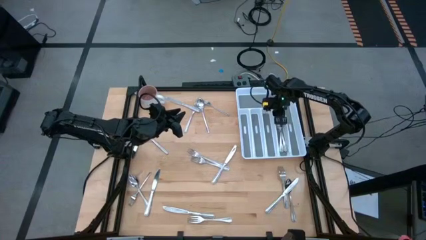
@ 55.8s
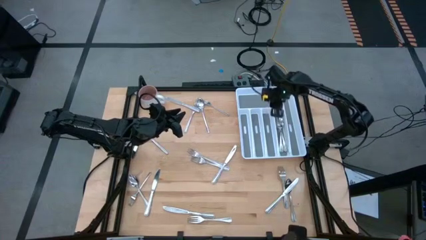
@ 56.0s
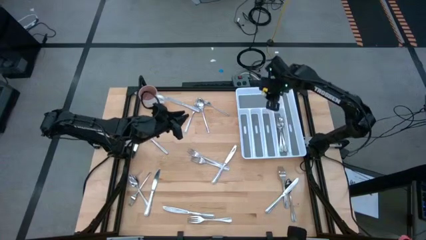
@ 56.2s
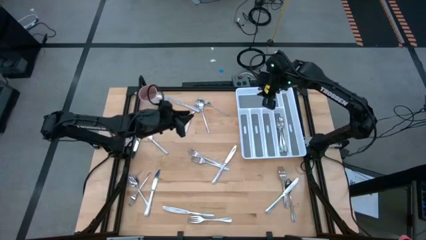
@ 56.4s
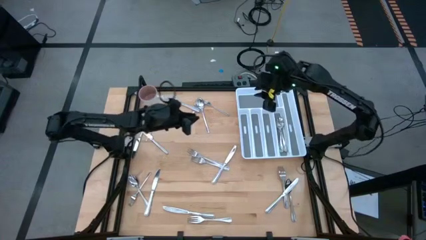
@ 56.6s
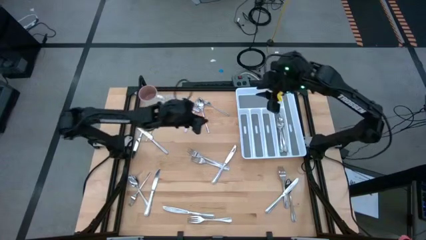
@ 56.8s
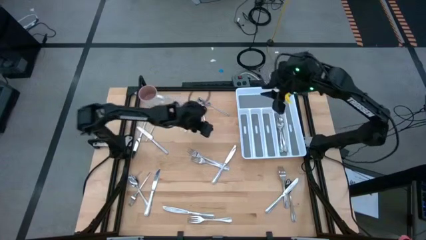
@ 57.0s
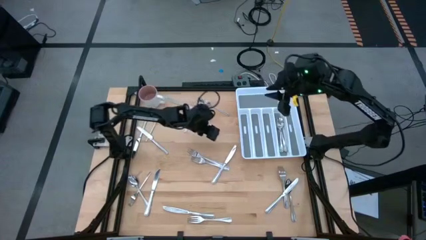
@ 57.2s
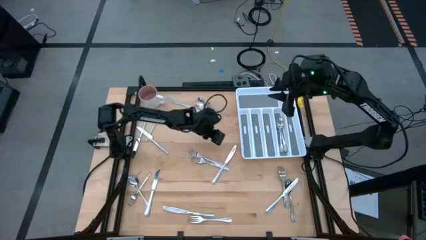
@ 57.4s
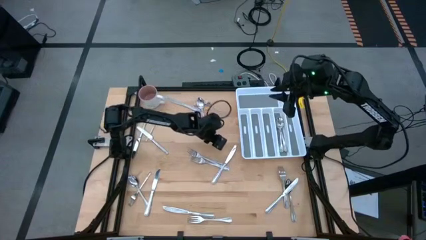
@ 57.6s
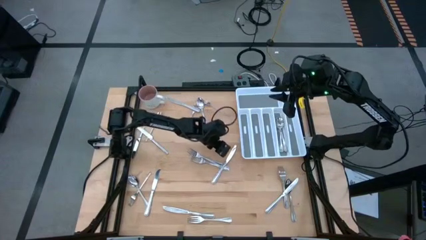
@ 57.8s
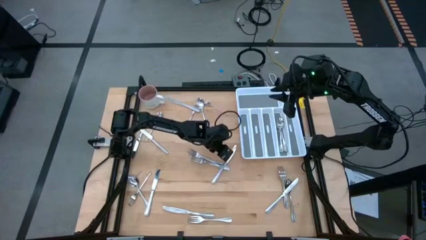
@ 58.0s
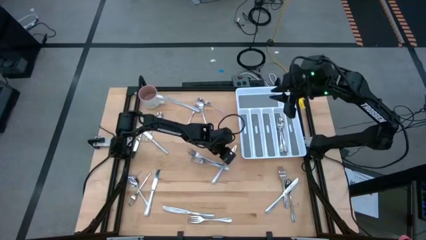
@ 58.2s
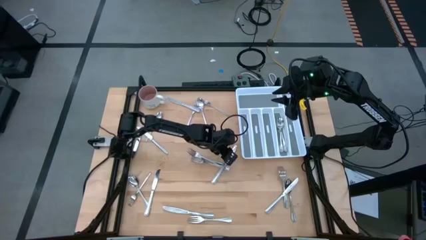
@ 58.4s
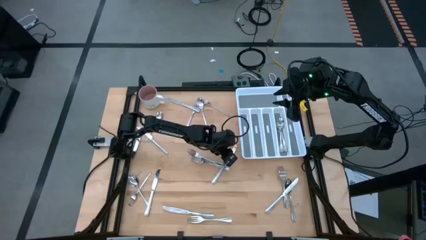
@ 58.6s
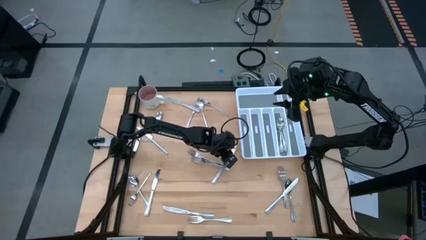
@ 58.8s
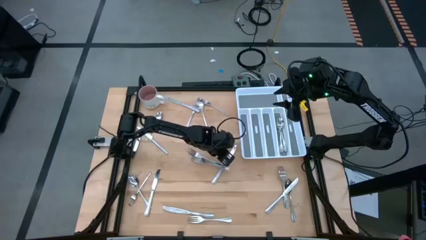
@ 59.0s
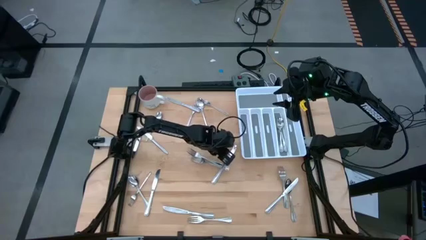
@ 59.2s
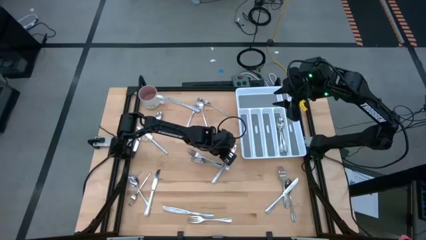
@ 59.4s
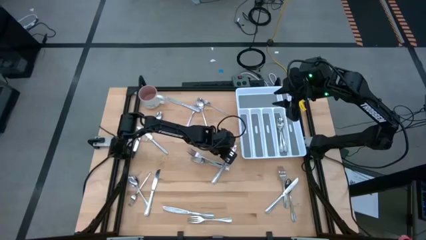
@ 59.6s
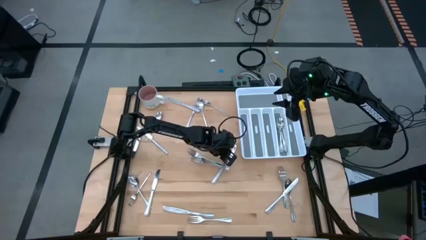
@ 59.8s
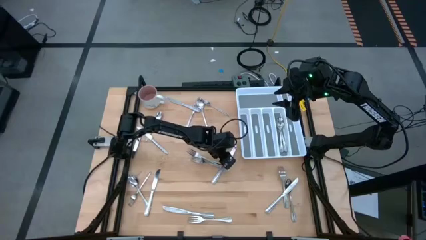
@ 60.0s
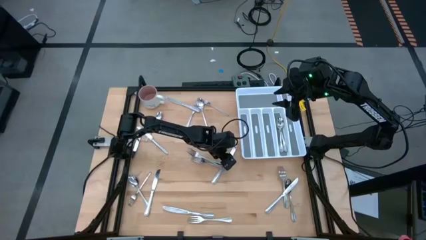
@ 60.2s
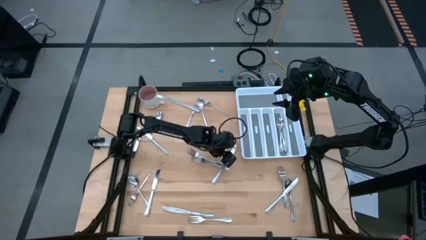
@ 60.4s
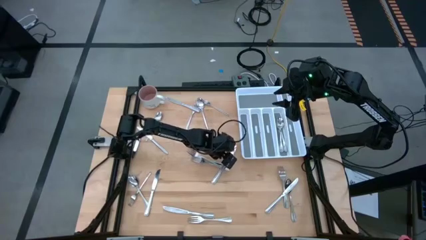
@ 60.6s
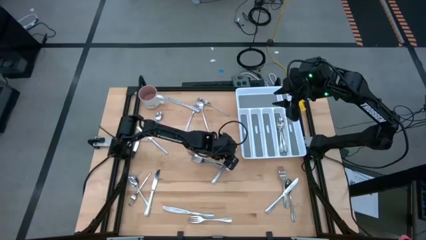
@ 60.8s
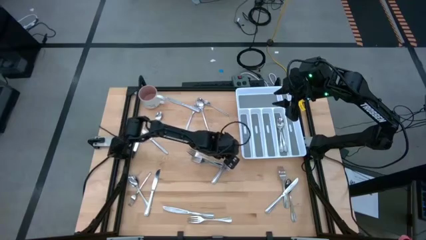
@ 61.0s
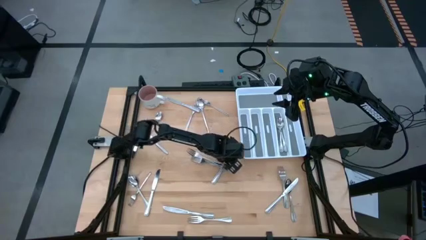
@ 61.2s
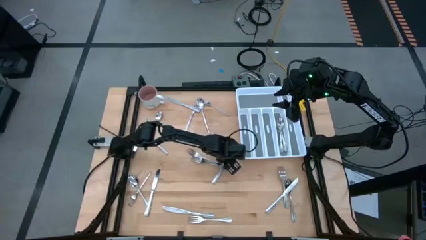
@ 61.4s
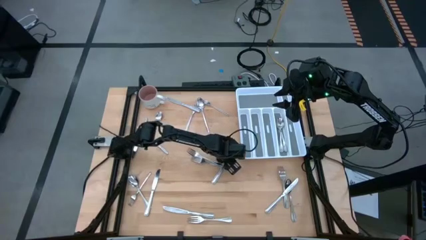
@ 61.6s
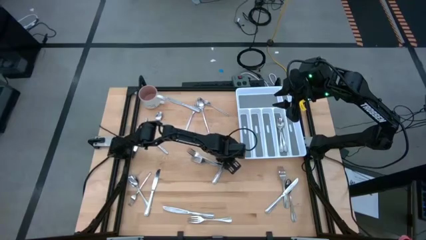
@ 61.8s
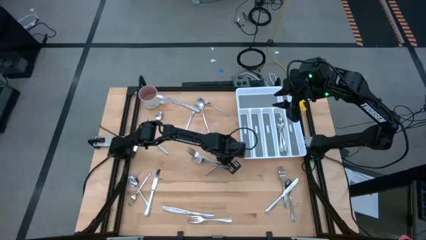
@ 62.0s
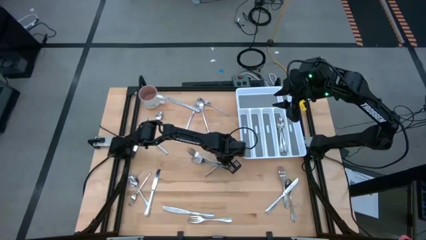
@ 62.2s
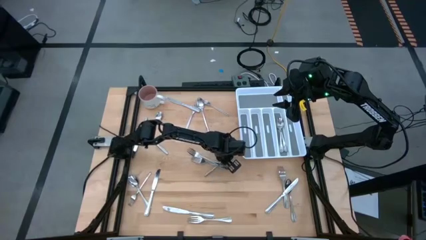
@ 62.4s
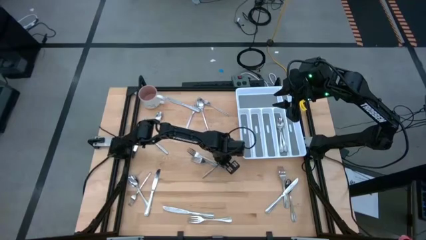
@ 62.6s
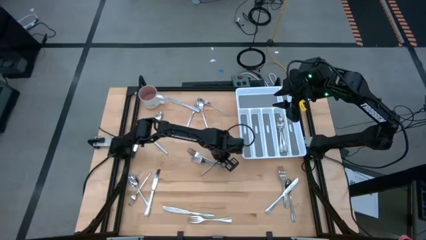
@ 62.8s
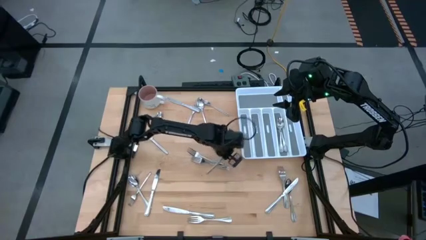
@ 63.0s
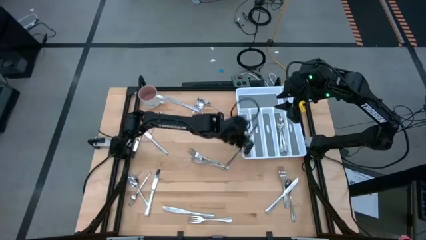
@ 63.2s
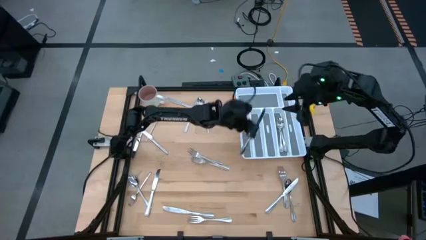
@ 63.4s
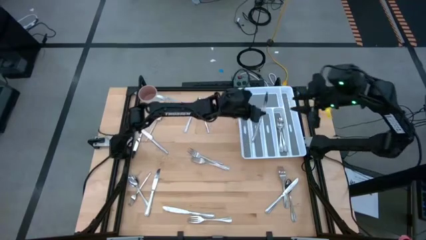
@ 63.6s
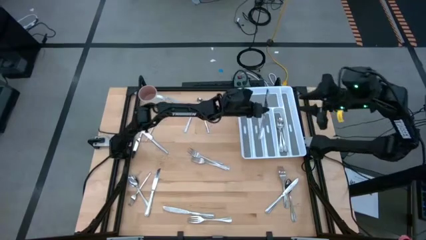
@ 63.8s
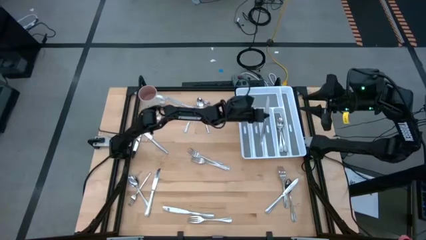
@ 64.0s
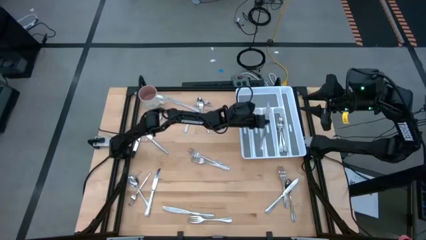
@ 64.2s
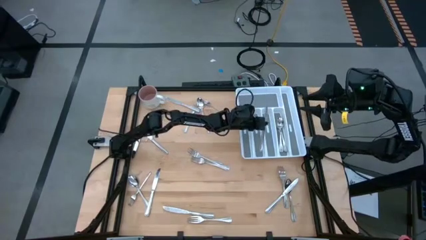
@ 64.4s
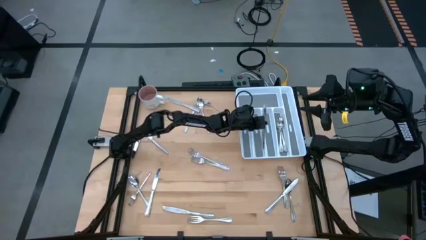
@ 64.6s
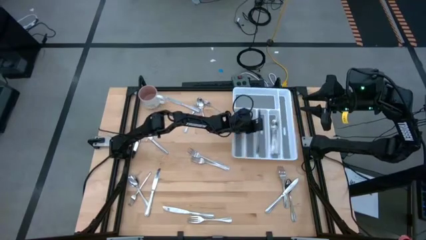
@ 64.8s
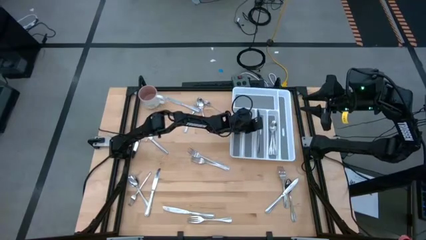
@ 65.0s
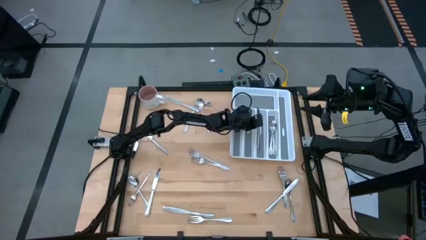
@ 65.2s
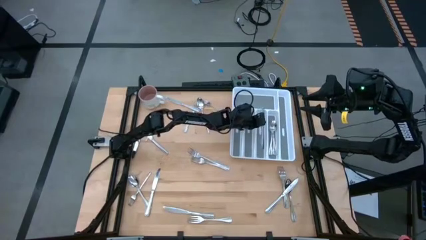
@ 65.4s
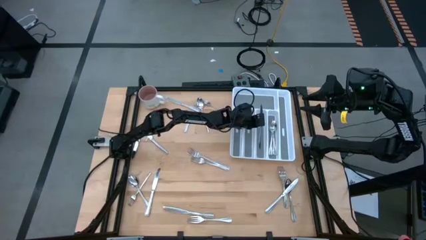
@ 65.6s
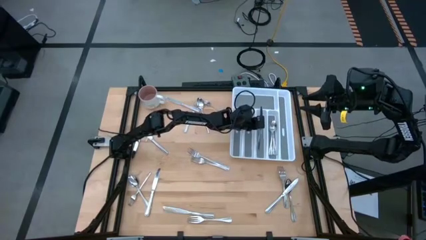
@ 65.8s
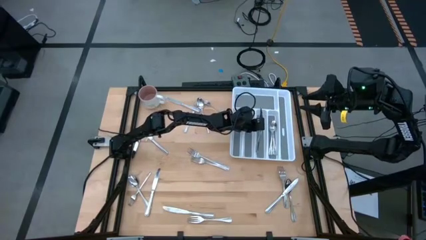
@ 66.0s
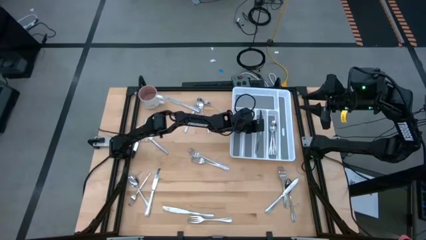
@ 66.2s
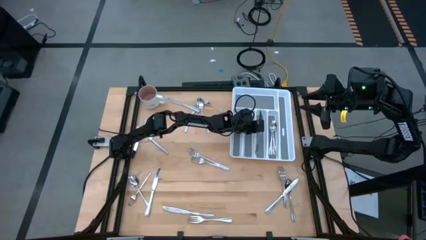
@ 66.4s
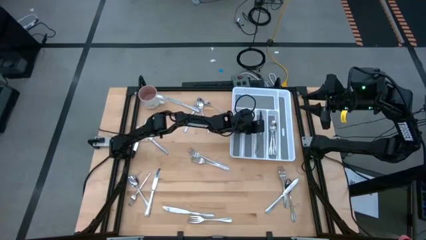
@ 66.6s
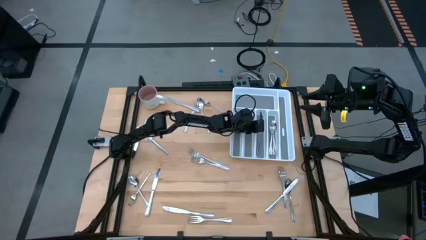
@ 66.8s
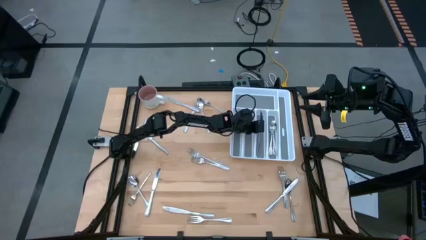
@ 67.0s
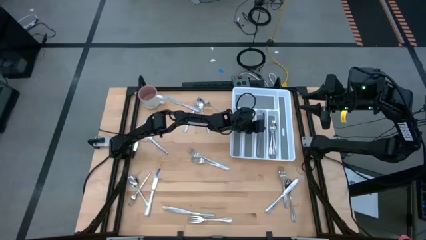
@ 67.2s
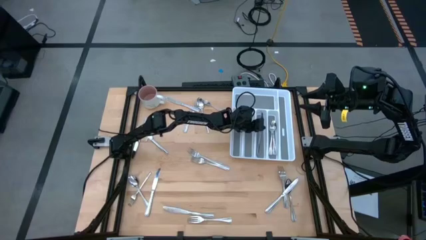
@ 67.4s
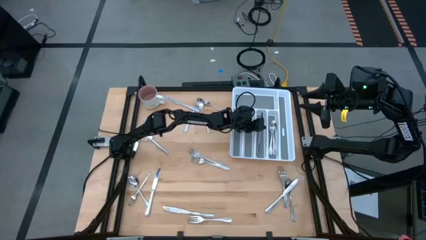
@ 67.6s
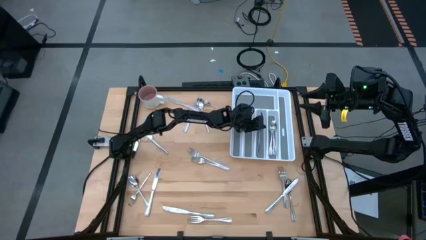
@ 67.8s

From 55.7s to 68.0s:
Task: Sort silverware
Put the silver table knife into the silverware tray

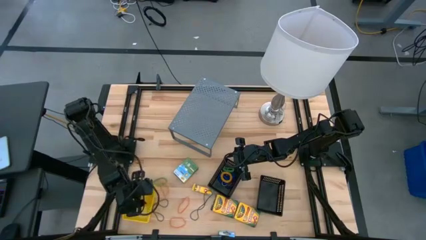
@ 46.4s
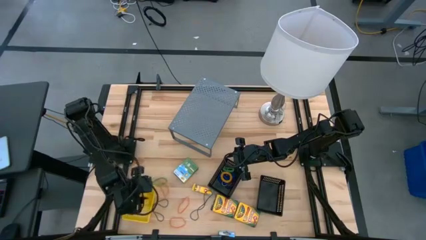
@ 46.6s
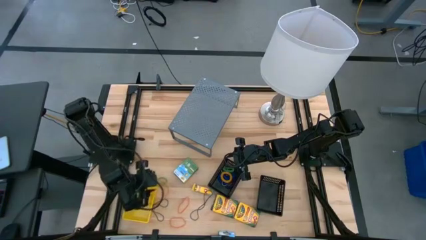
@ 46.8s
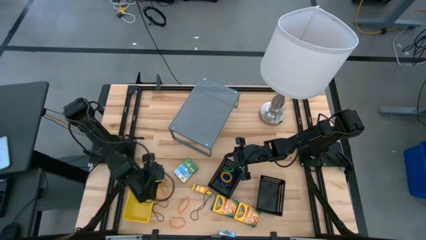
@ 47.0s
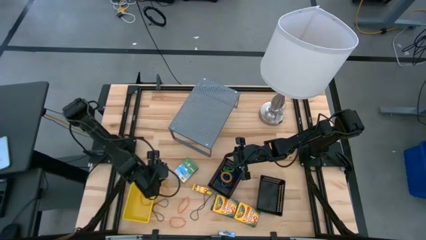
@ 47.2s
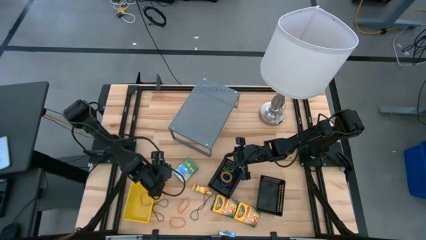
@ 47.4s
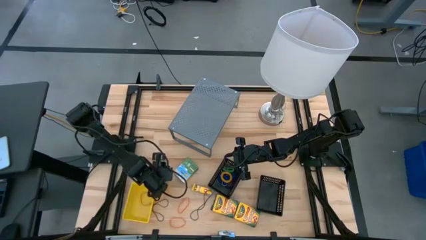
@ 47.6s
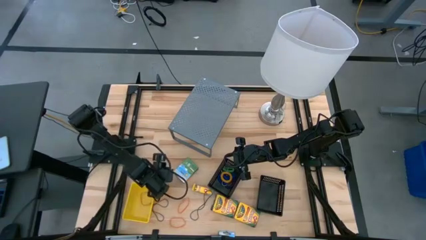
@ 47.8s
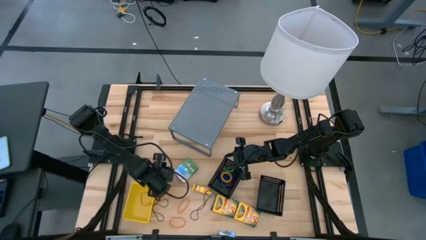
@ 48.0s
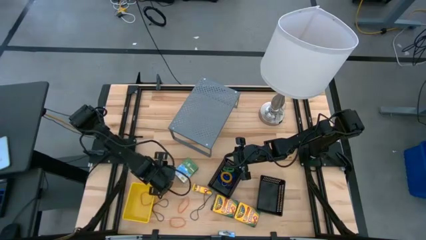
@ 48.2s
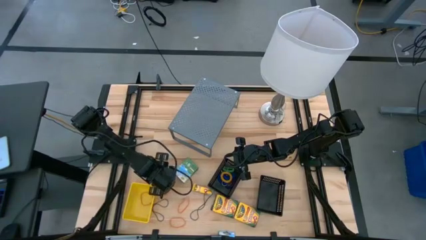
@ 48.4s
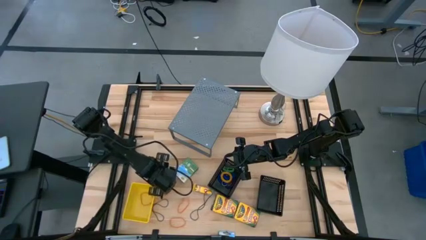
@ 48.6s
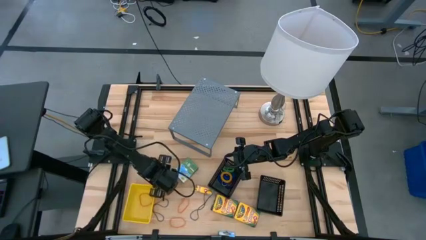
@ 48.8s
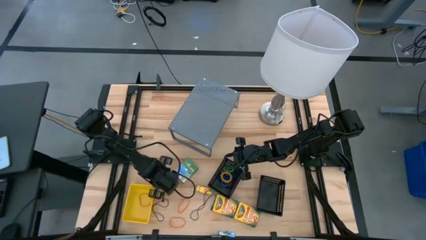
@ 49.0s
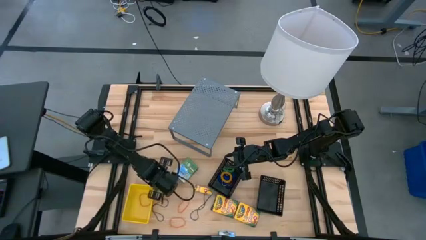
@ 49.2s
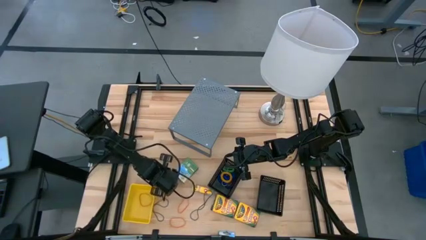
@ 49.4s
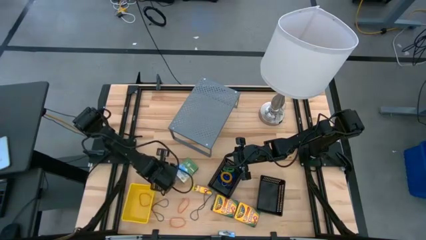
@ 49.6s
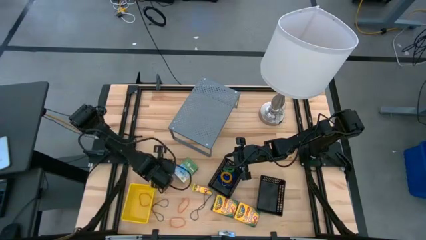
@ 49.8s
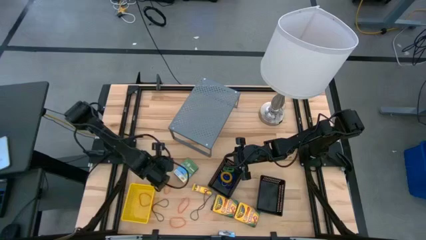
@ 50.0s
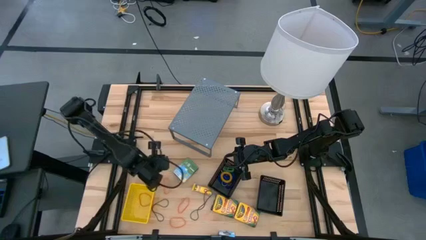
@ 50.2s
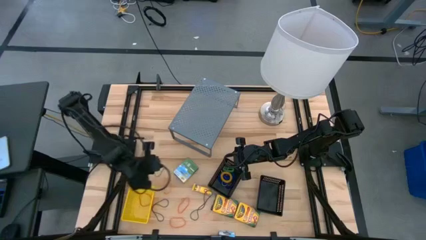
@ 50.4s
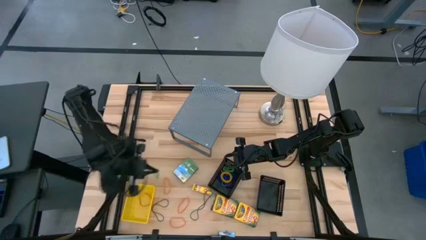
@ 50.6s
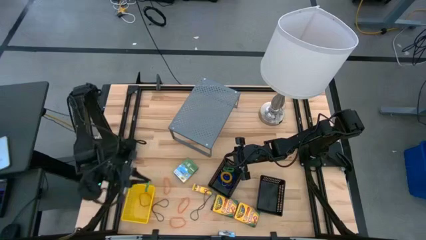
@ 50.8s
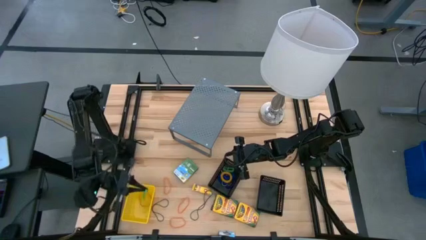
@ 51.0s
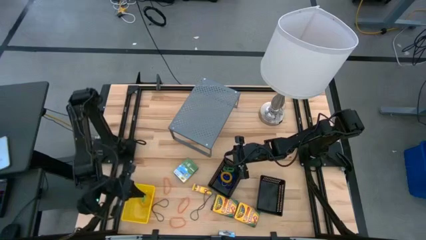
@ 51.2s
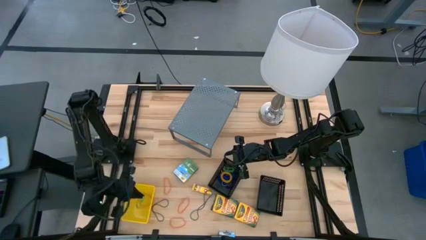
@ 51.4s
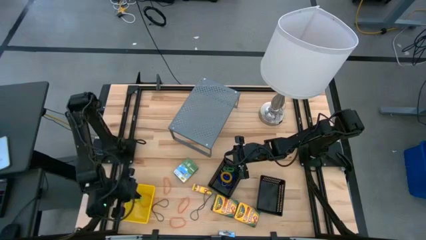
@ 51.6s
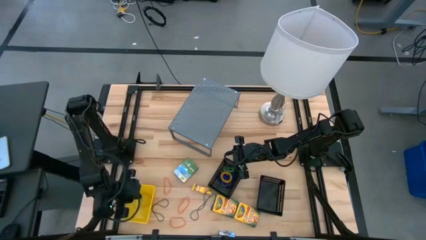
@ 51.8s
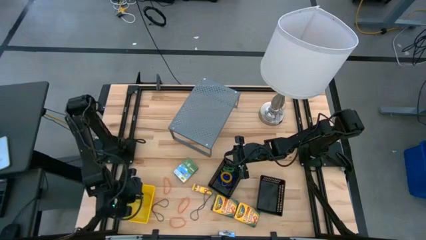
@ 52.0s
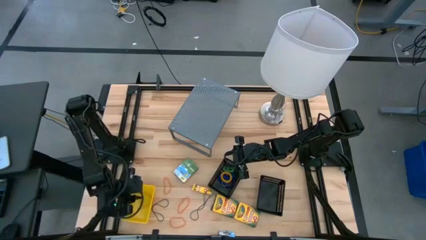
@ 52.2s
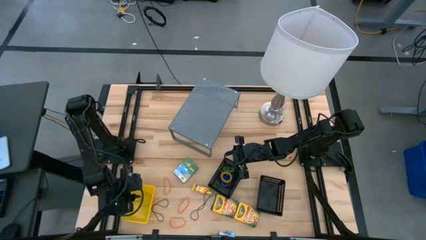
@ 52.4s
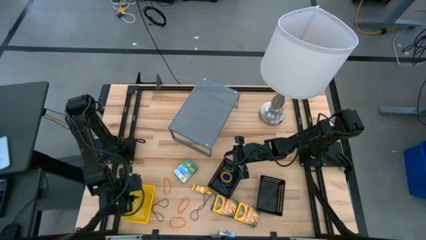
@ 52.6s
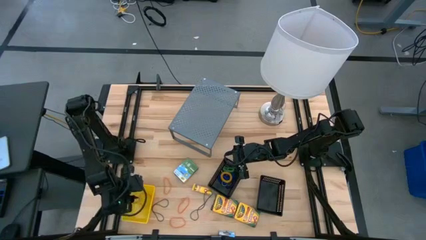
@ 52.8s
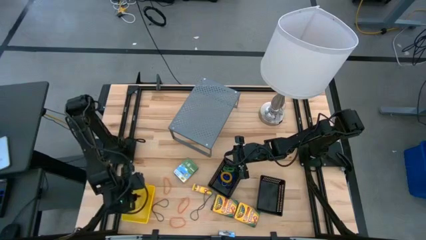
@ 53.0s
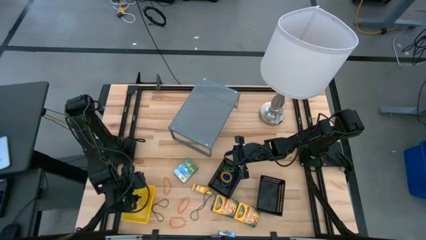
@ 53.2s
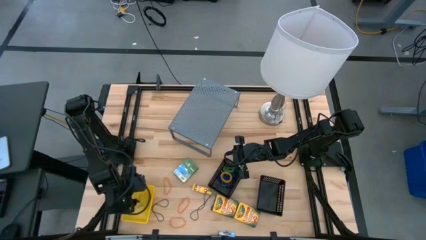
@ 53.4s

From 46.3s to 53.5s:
Task: Pick & Place Office Desk Supplies
Put the green rubber band into the yellow bin
